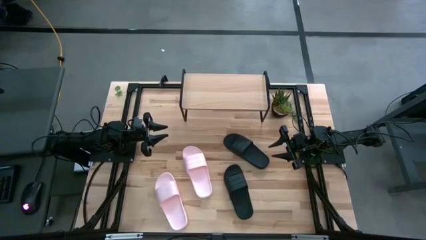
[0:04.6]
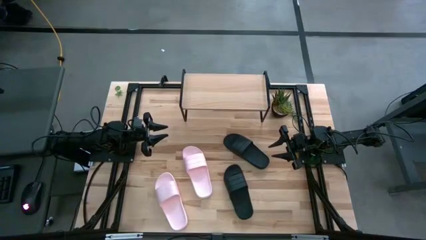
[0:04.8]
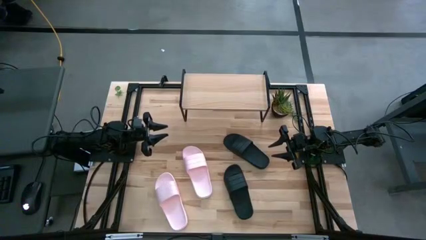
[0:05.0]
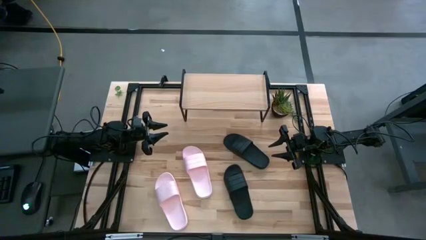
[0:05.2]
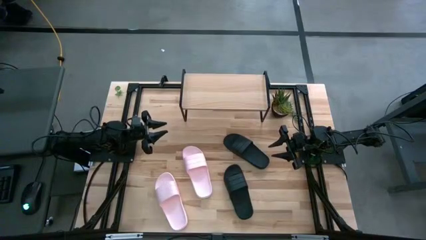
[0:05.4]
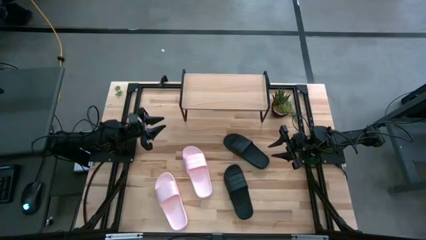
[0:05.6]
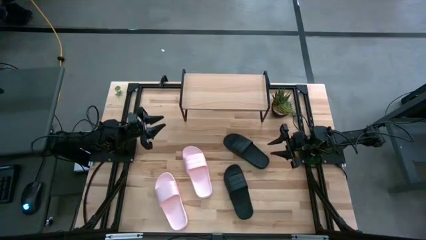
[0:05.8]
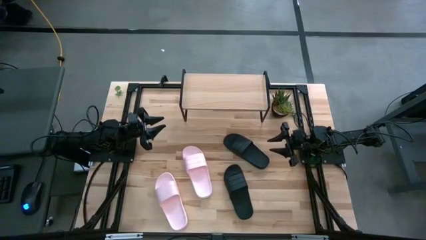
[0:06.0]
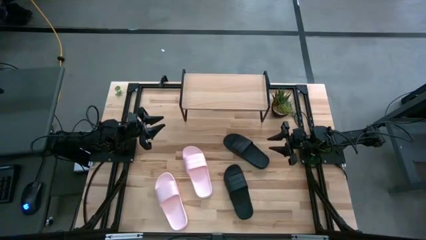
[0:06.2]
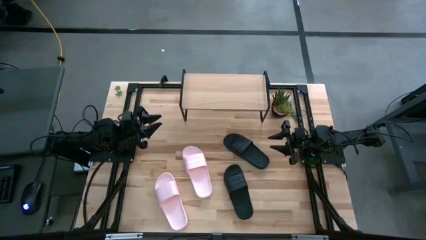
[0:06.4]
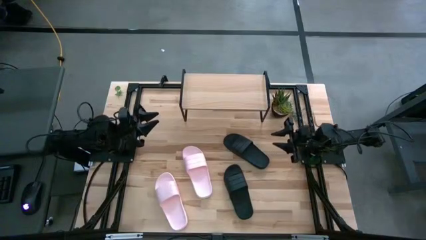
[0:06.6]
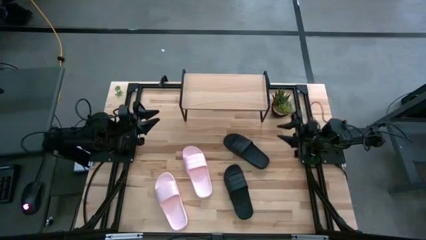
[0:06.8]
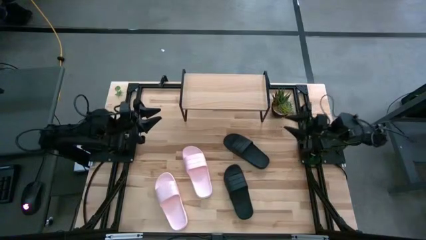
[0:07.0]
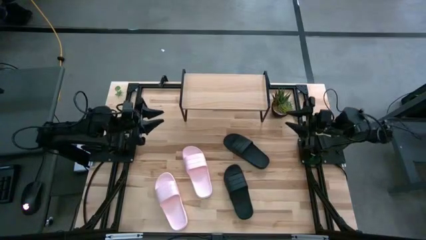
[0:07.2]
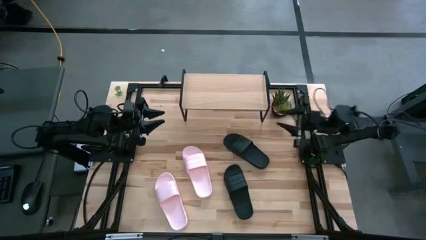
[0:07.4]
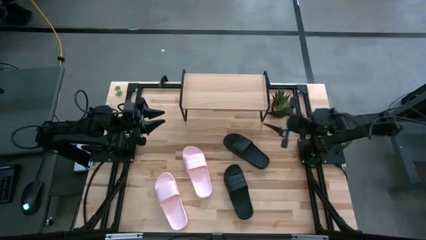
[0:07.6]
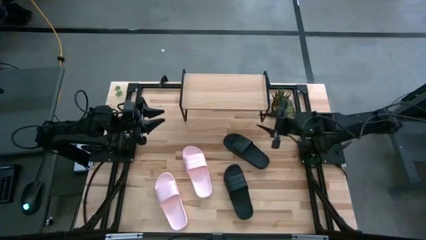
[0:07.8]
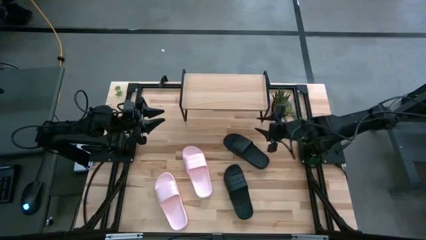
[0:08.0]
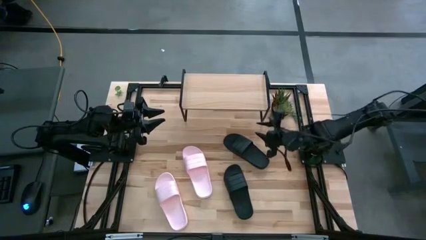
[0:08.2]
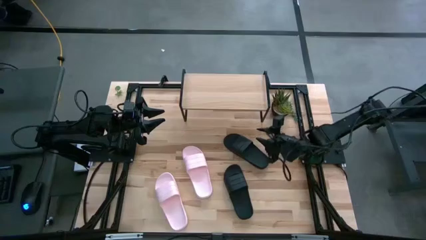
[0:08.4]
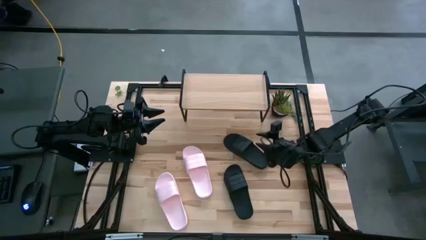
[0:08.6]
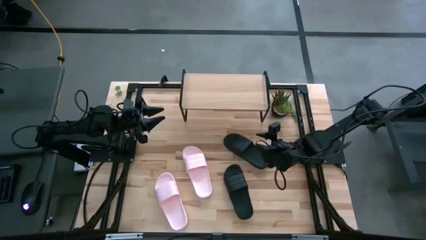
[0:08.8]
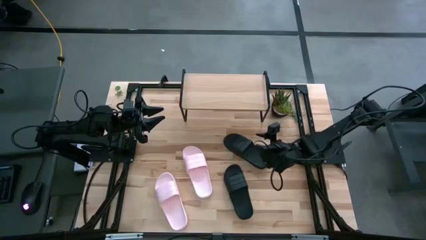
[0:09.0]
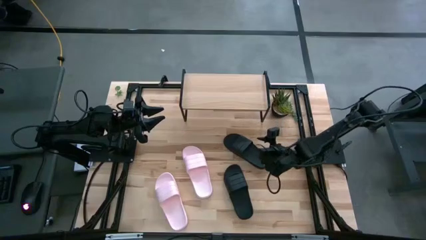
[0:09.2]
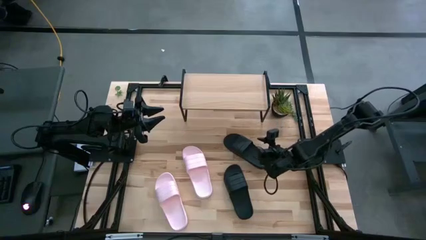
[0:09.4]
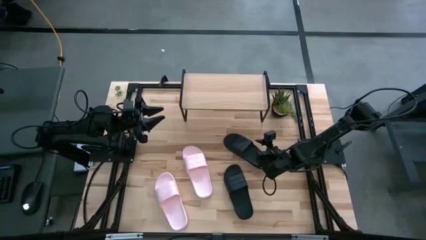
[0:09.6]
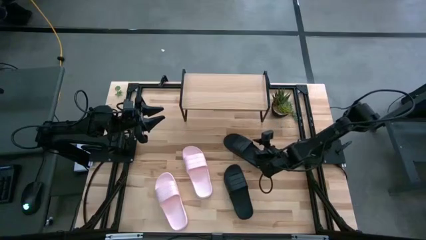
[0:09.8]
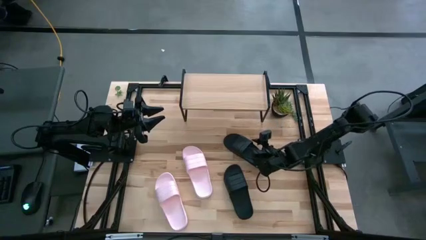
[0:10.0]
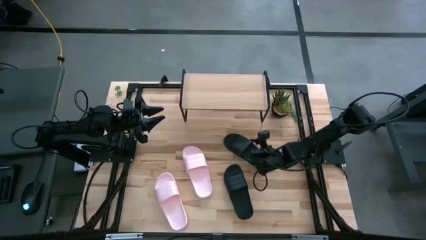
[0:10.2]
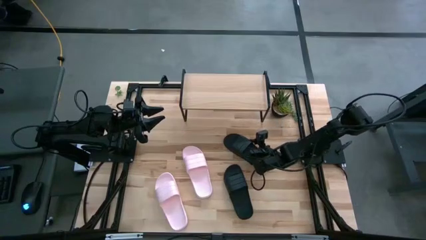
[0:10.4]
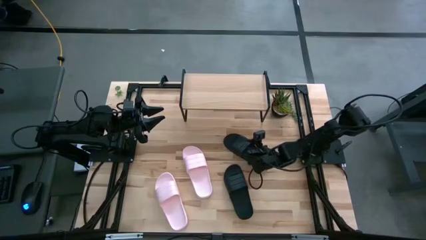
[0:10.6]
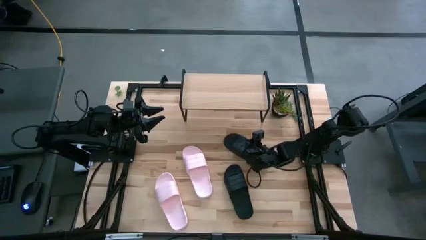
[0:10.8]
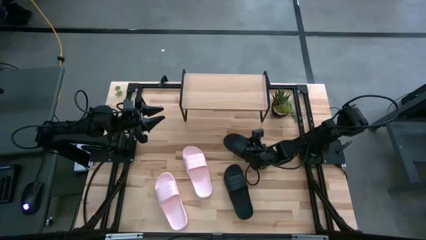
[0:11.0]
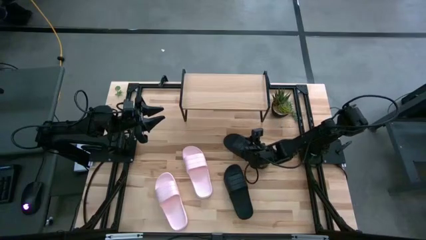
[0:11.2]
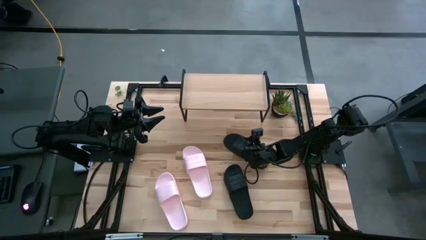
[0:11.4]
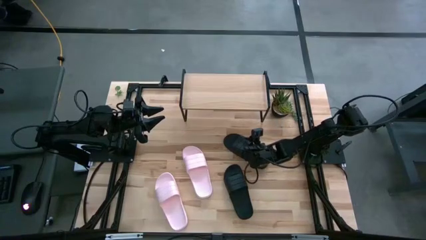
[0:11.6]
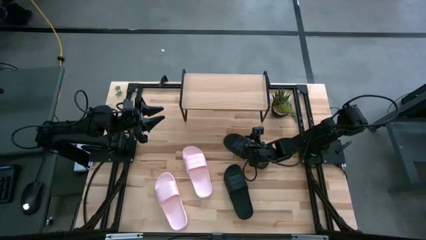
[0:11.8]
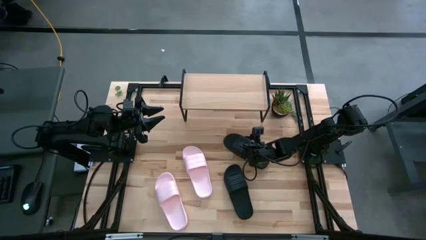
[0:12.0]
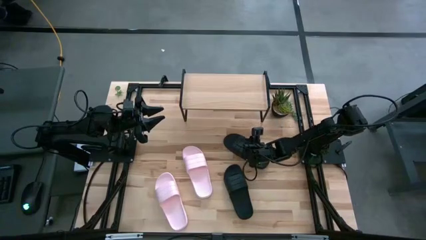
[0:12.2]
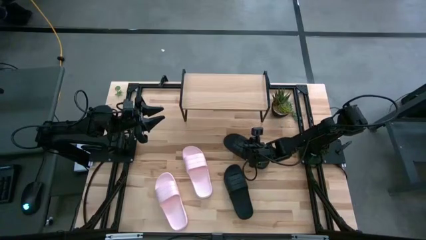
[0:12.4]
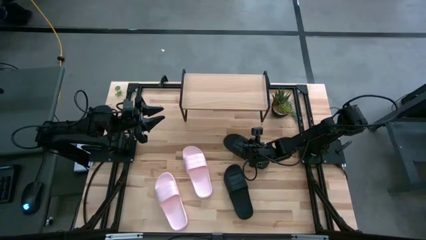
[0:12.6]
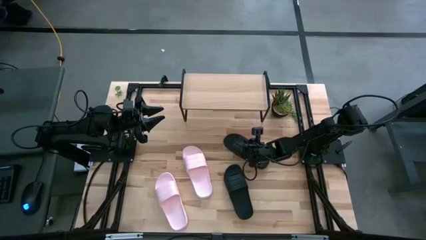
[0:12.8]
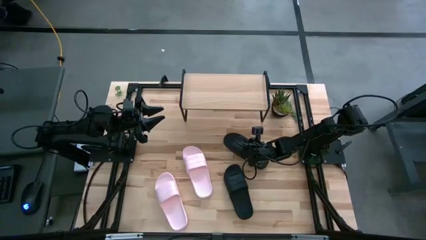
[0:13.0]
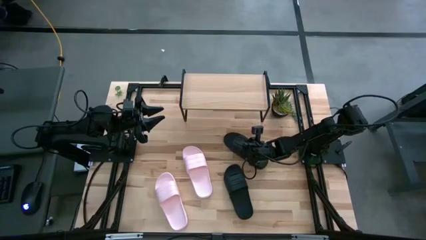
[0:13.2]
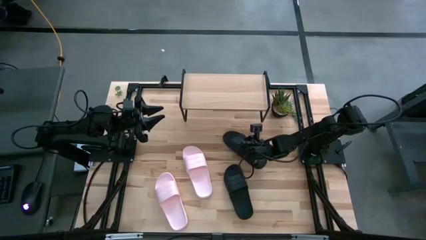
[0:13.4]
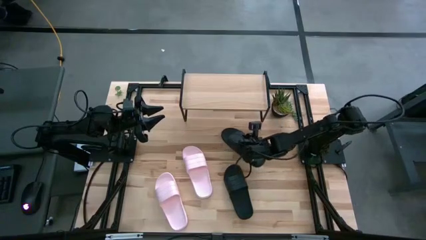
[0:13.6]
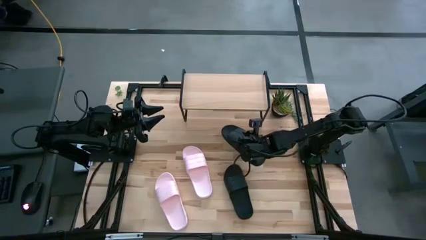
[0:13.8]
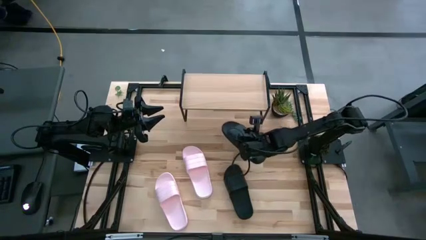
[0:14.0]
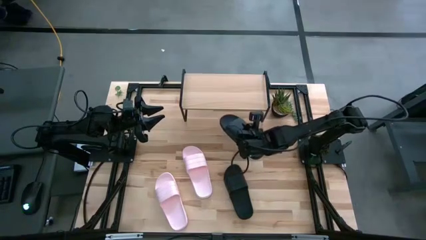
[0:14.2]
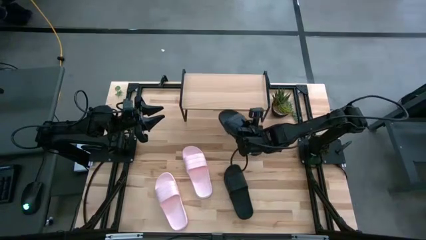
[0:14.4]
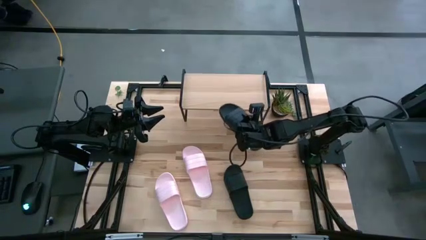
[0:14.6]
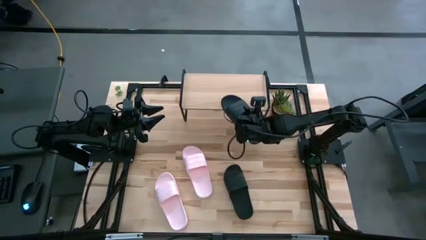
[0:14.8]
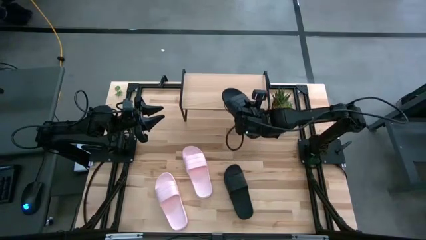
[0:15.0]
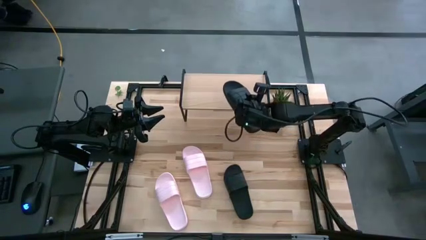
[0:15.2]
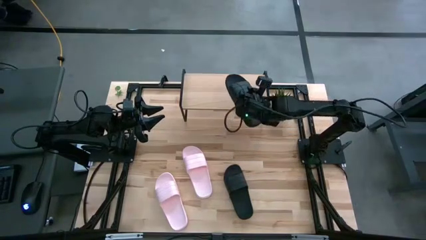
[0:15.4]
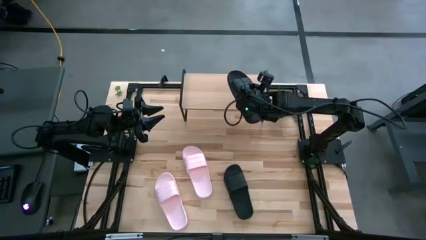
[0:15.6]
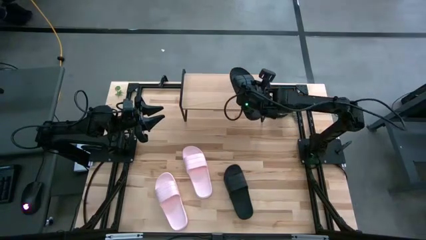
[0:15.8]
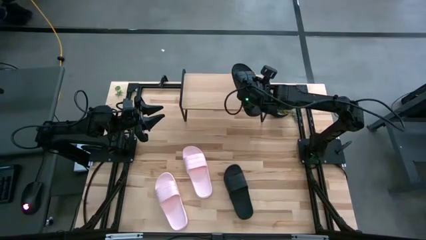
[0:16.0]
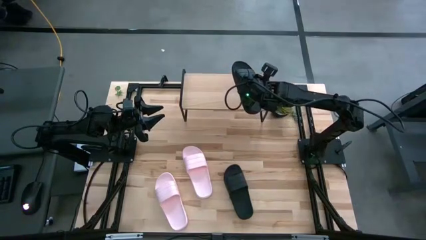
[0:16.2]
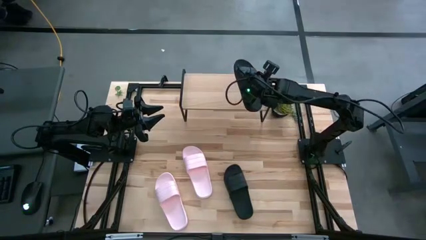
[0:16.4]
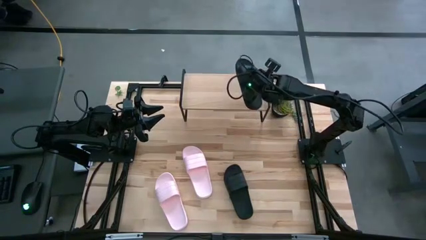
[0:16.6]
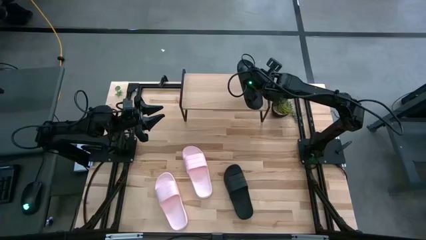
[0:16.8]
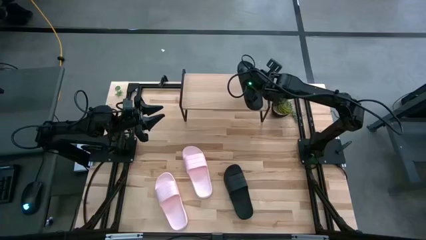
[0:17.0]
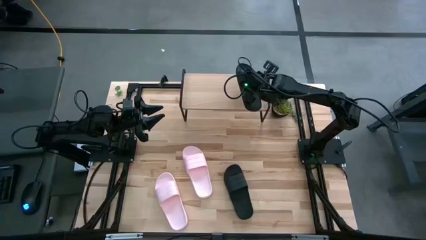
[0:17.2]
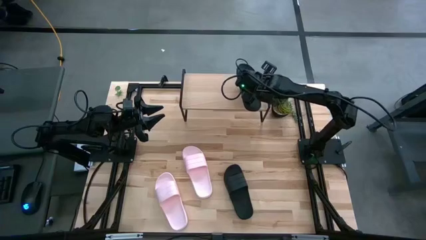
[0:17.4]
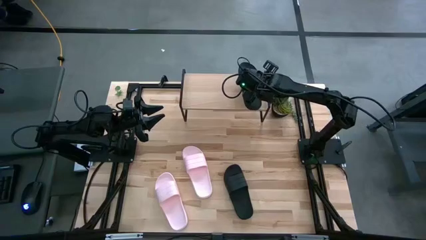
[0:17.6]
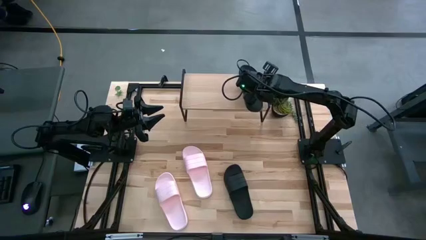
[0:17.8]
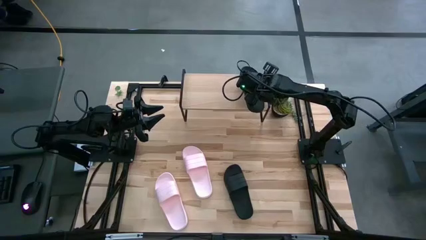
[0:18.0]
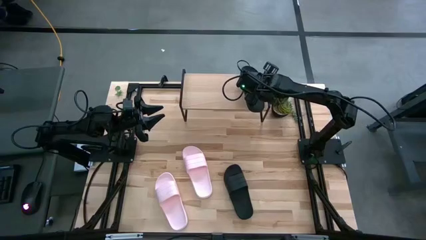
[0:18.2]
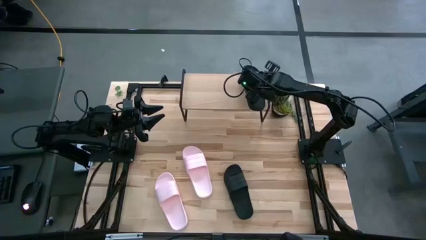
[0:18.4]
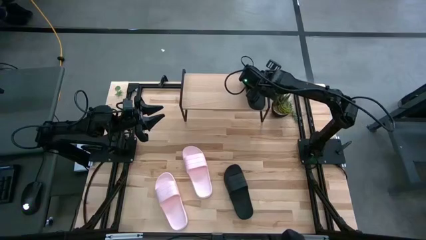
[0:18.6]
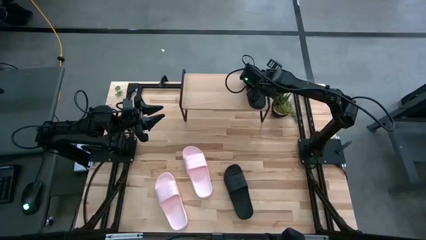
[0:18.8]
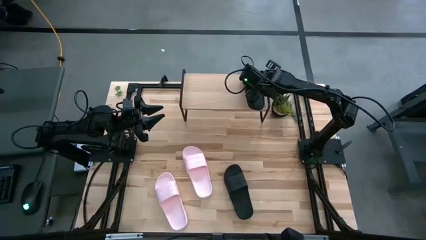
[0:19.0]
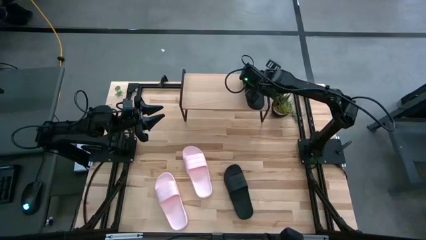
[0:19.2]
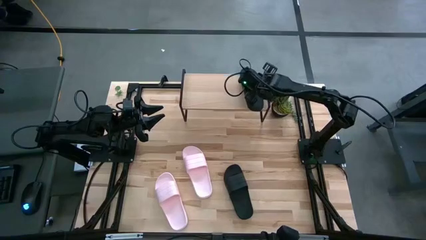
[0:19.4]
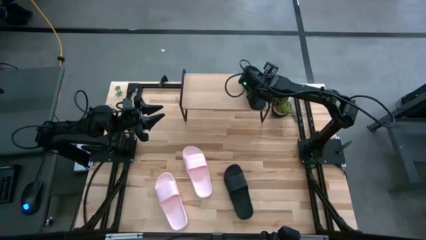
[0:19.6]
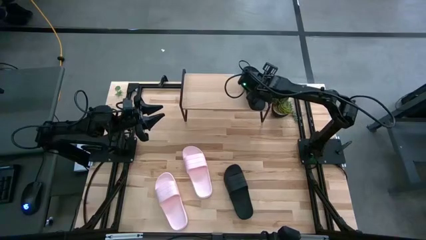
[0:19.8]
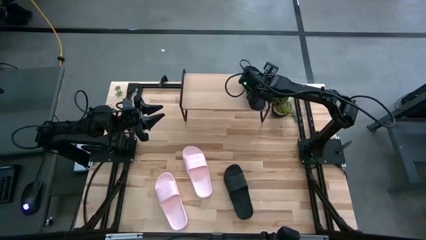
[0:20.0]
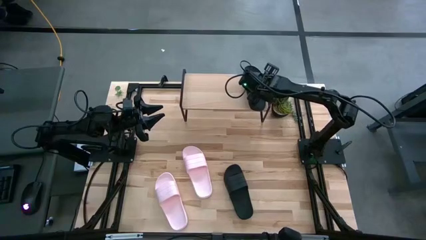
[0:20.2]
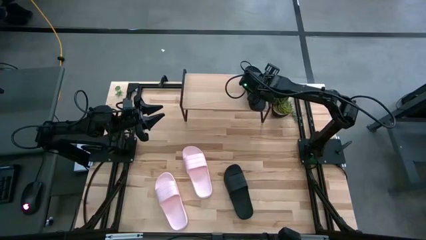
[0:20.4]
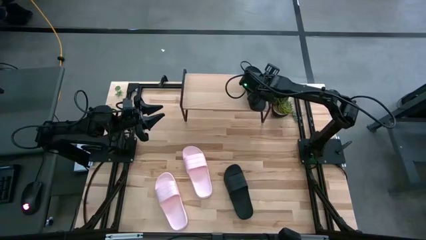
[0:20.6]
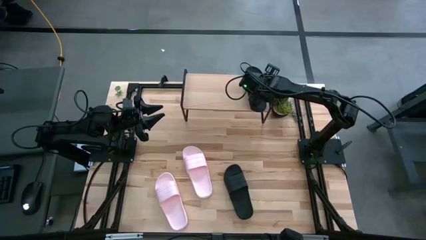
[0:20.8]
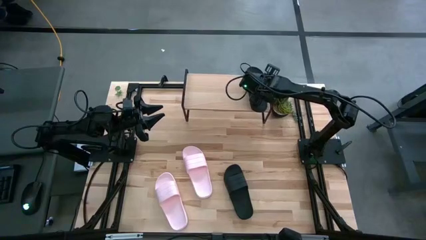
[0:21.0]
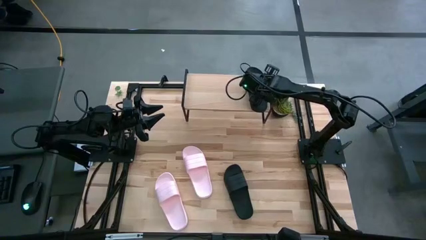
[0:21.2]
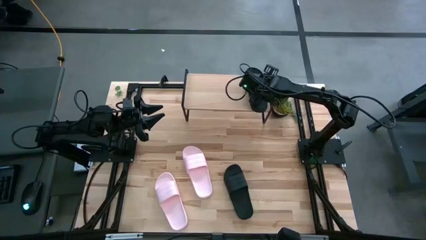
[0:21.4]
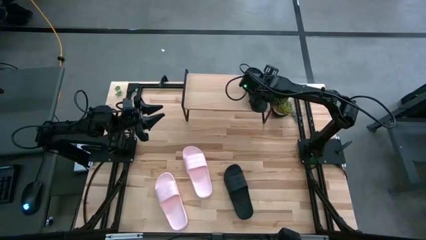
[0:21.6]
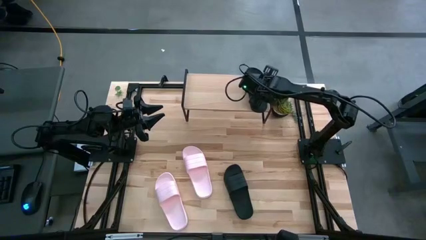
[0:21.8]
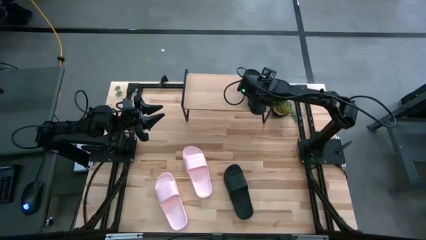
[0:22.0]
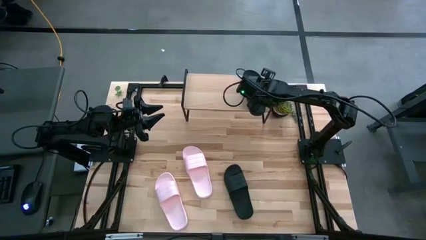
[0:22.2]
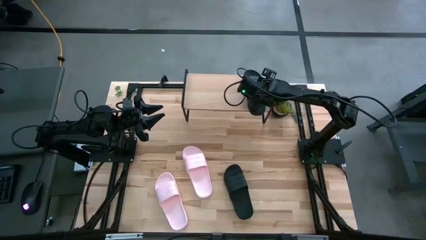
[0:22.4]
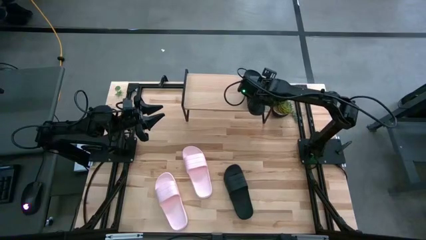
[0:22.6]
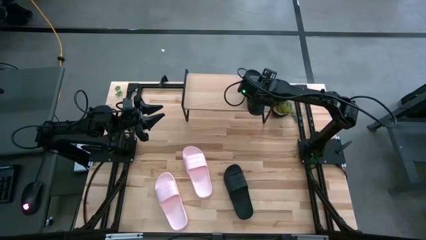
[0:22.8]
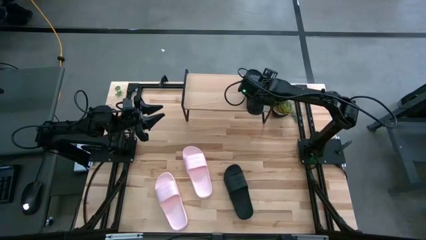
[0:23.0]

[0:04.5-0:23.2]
Task: Pick and place slides into the shelf
Put the right black slipper on the shelf
